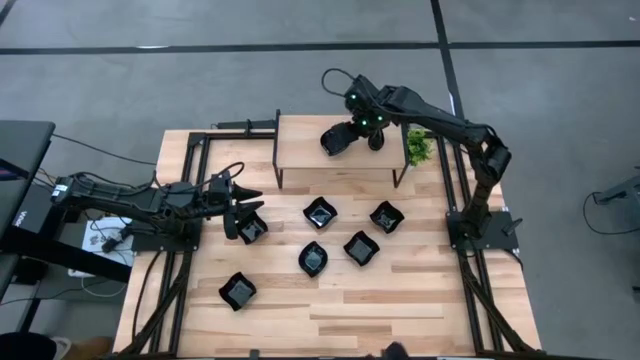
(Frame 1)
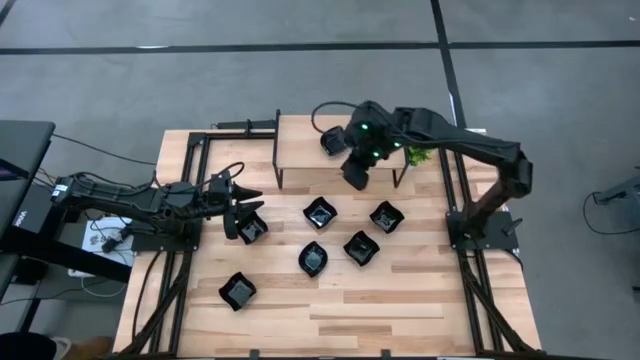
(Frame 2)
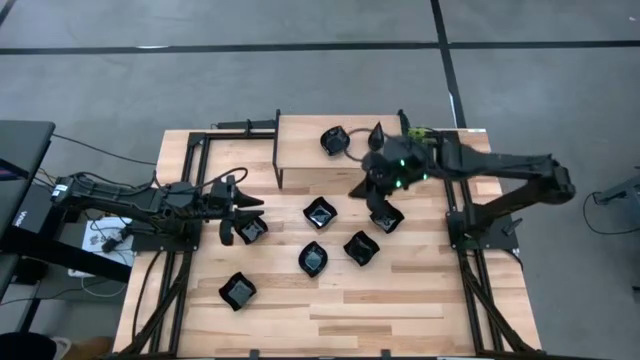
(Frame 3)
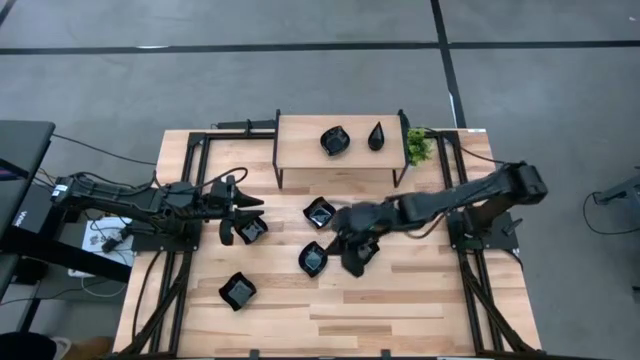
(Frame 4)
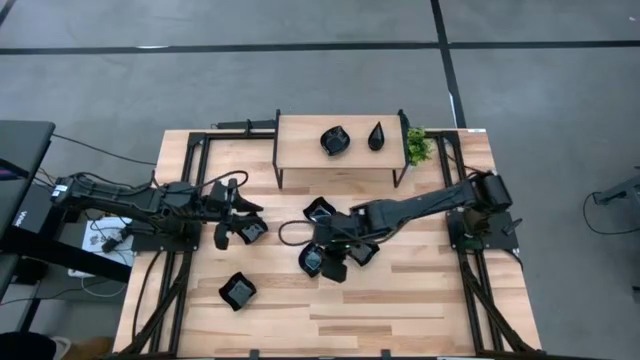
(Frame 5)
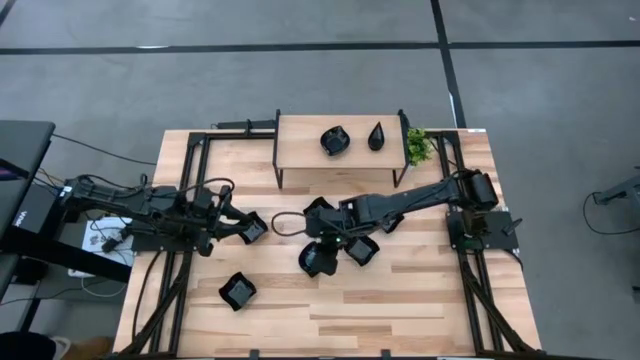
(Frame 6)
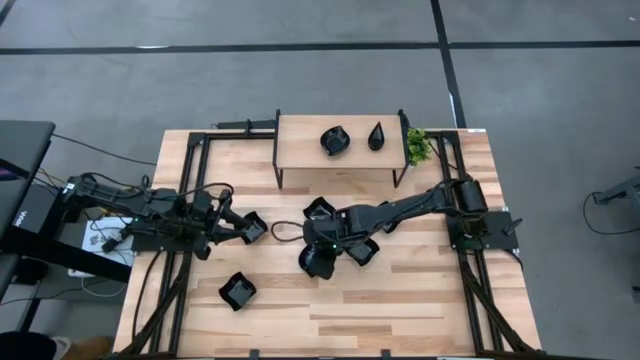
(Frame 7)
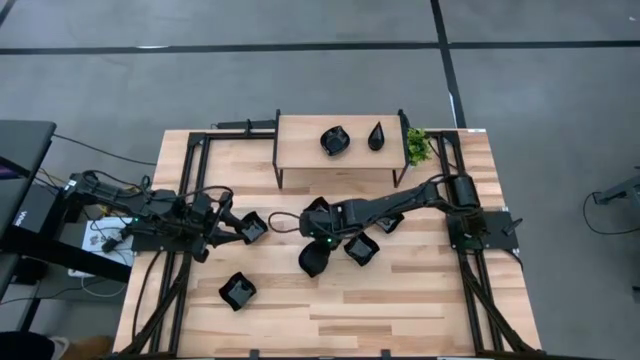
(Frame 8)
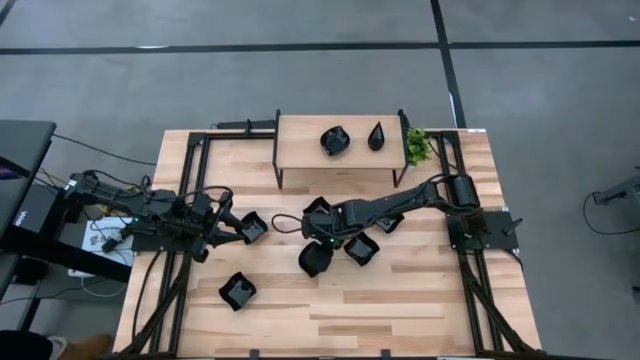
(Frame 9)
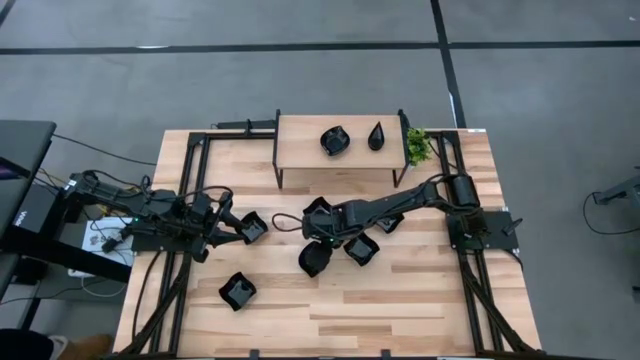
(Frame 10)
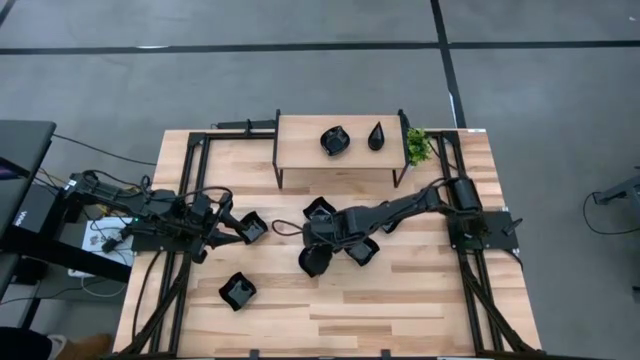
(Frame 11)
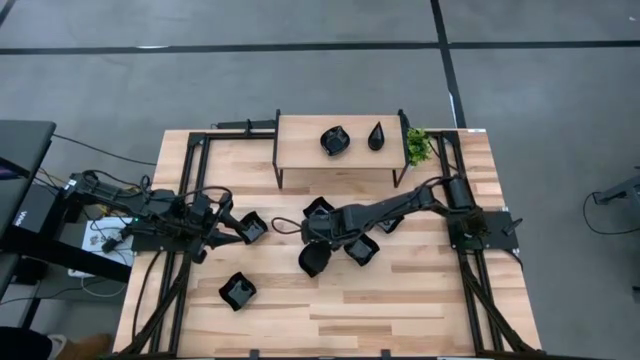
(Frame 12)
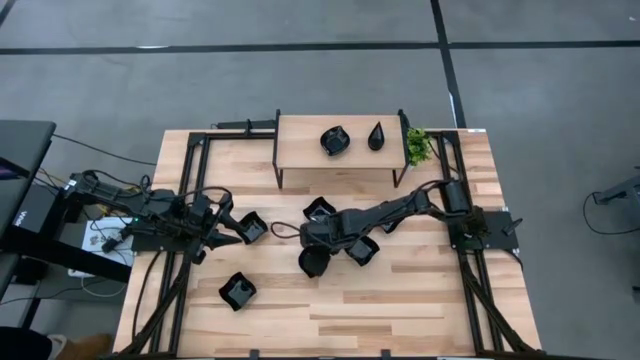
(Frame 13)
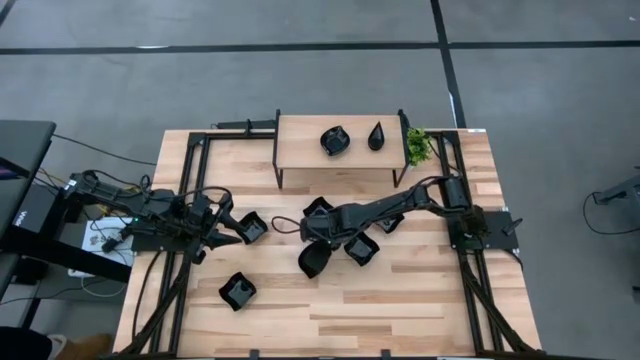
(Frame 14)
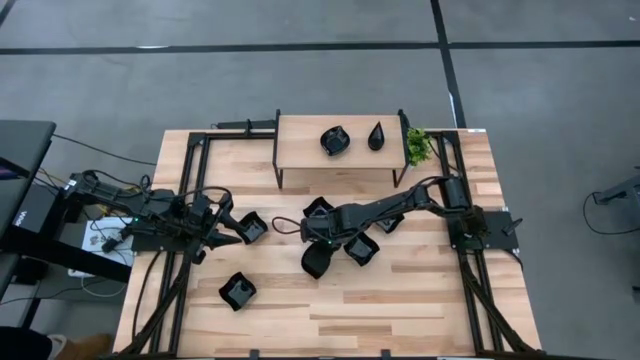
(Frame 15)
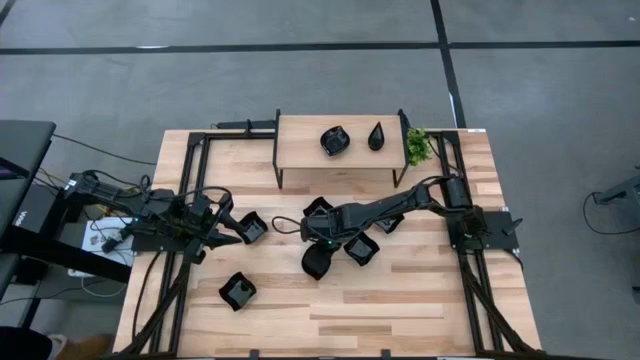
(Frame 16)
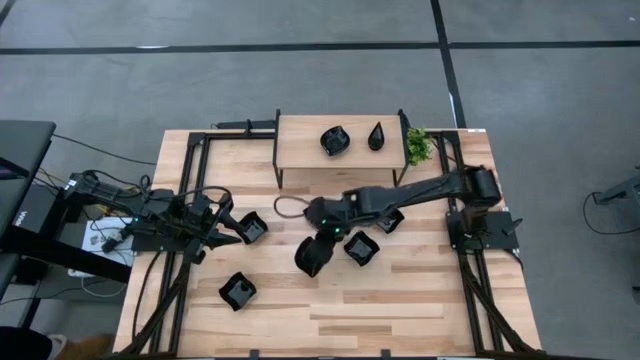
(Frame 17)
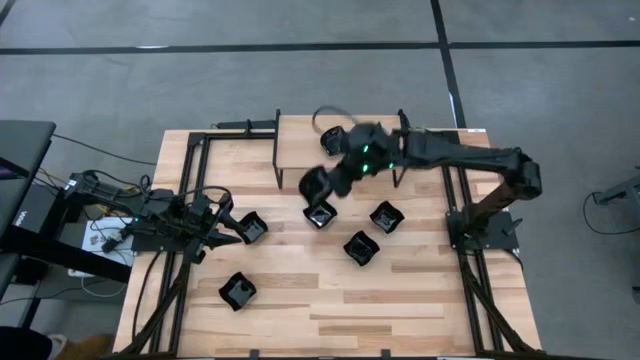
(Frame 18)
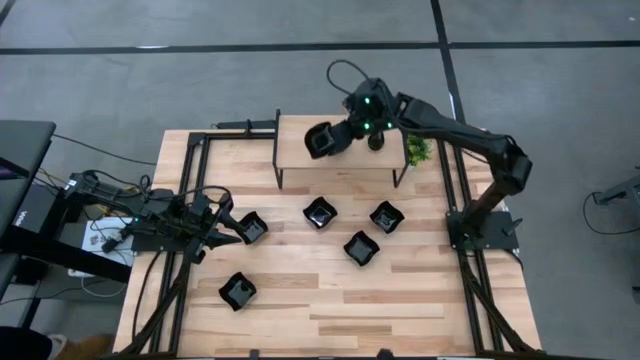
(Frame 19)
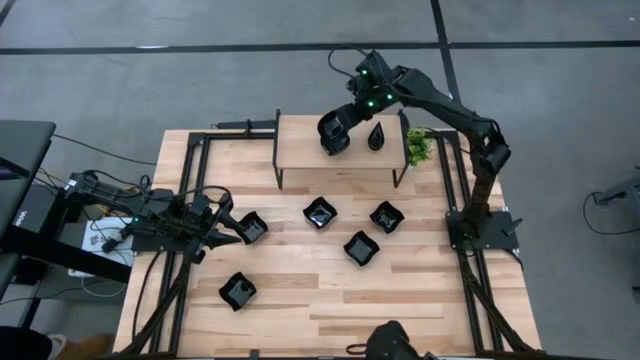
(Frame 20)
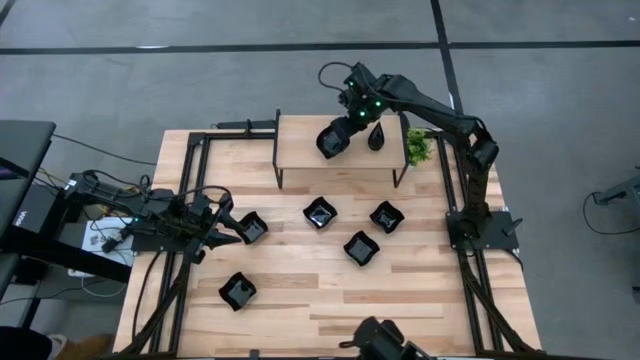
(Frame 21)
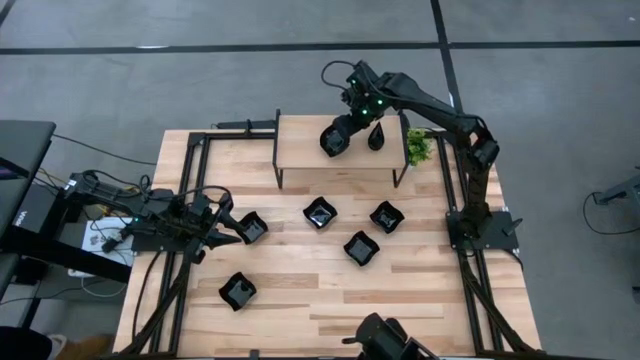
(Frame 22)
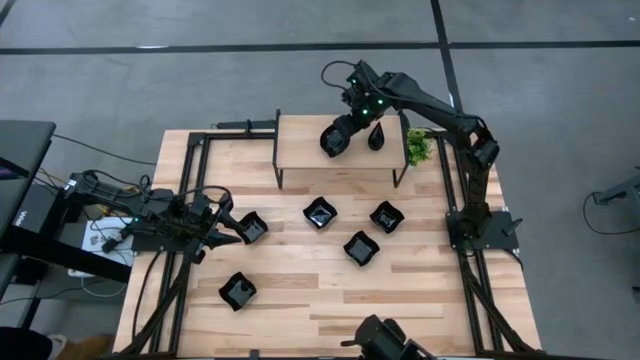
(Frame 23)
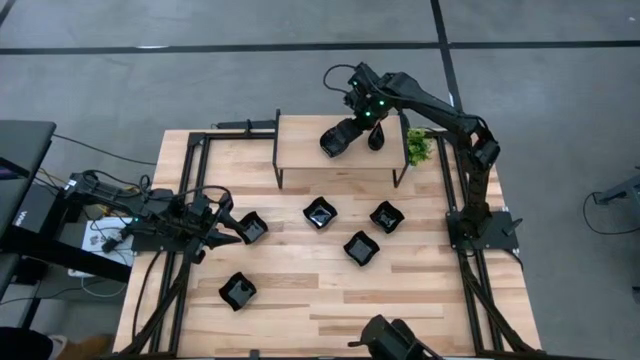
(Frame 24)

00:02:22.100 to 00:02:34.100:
Task: Pick & Place Mini shaped plates
Stack the leaf-shaped plate on top of the other leaf-shaped plates on the shelf

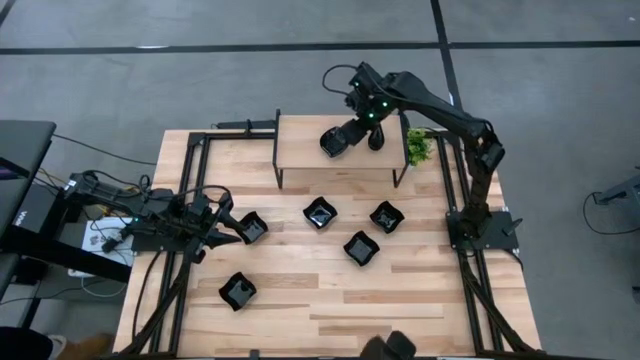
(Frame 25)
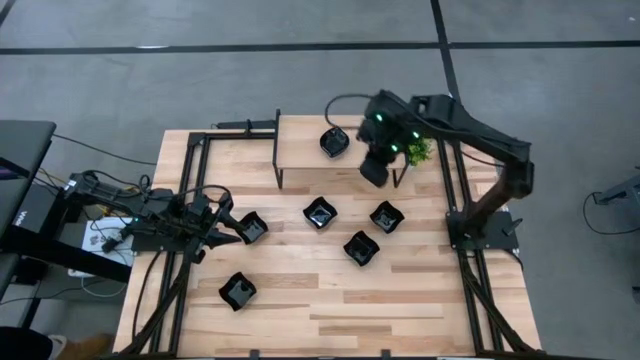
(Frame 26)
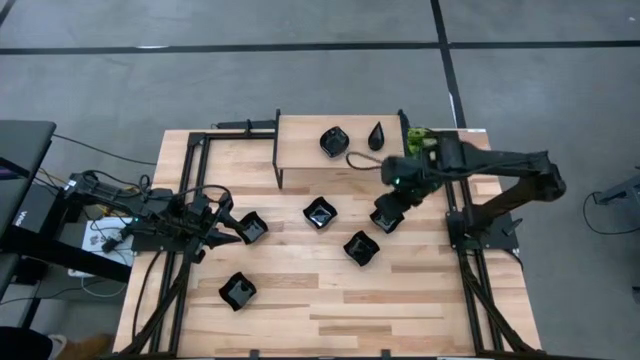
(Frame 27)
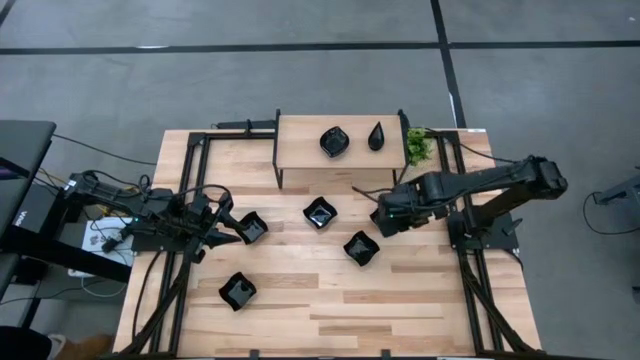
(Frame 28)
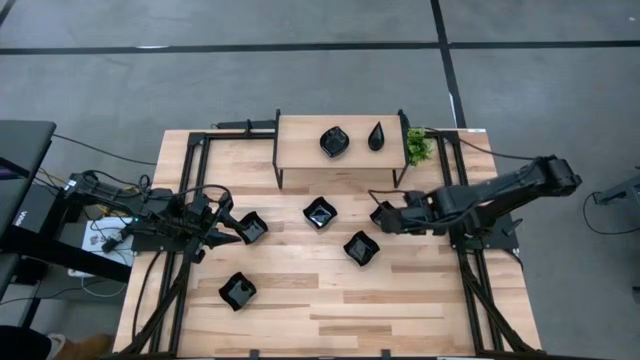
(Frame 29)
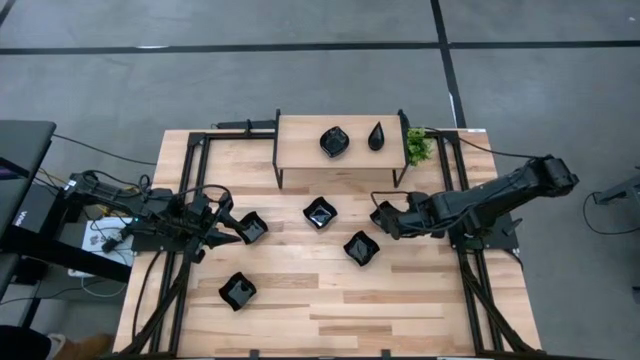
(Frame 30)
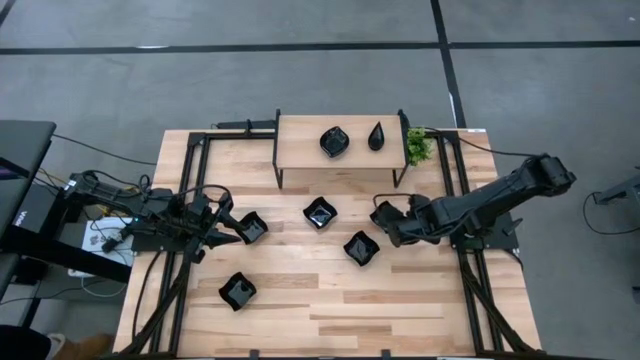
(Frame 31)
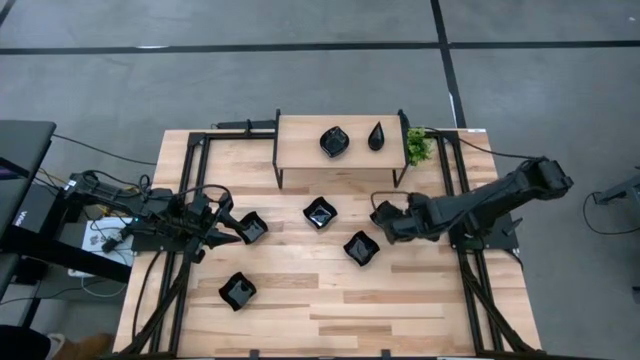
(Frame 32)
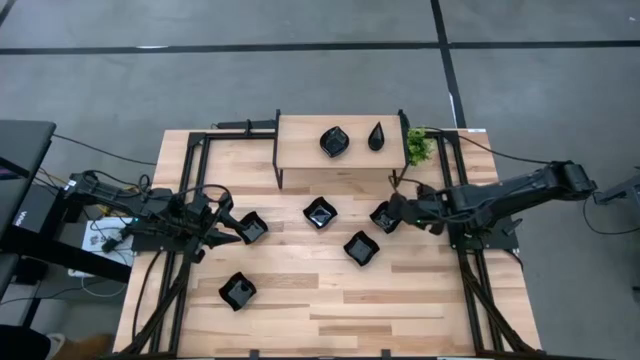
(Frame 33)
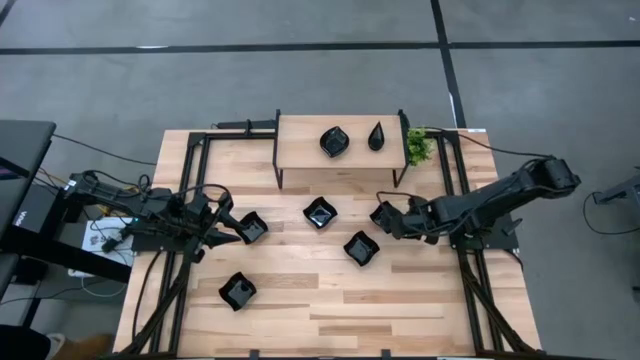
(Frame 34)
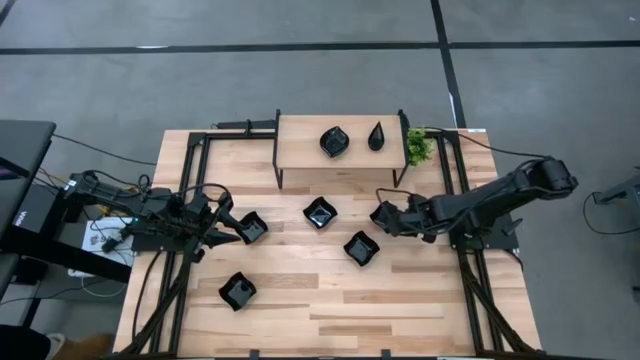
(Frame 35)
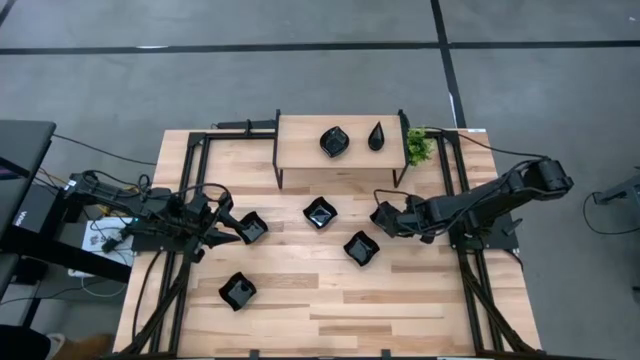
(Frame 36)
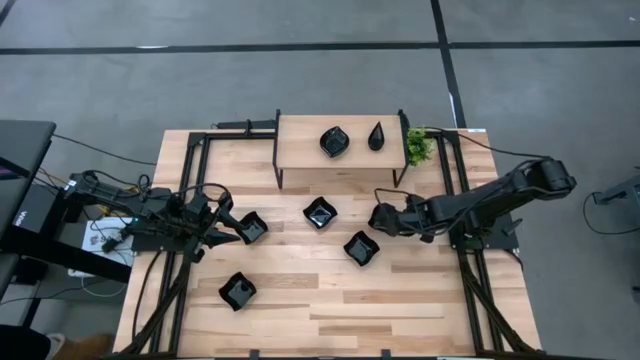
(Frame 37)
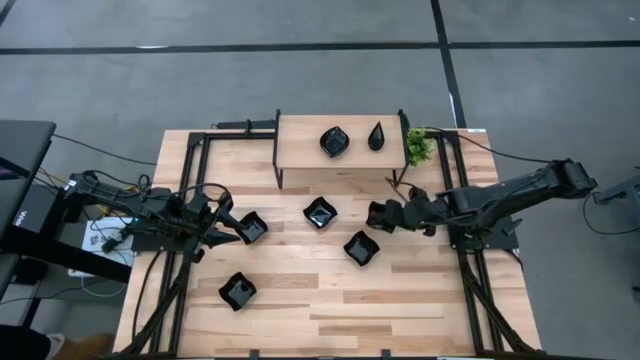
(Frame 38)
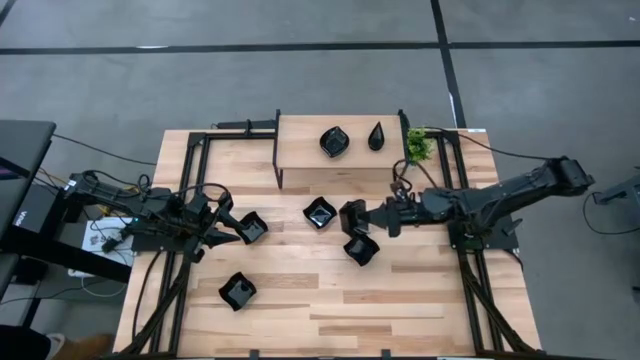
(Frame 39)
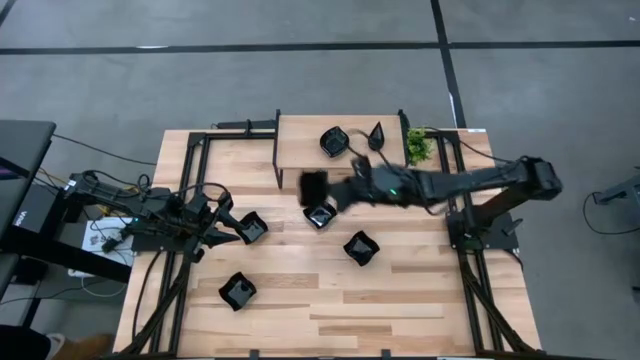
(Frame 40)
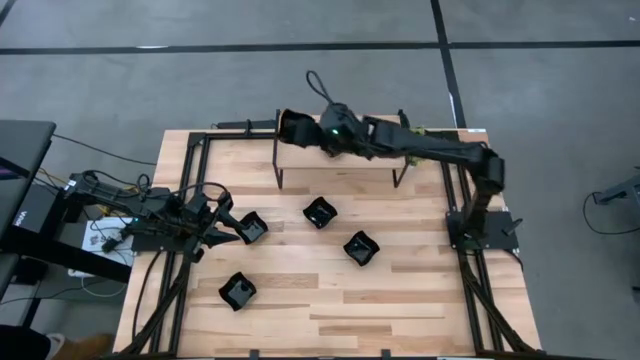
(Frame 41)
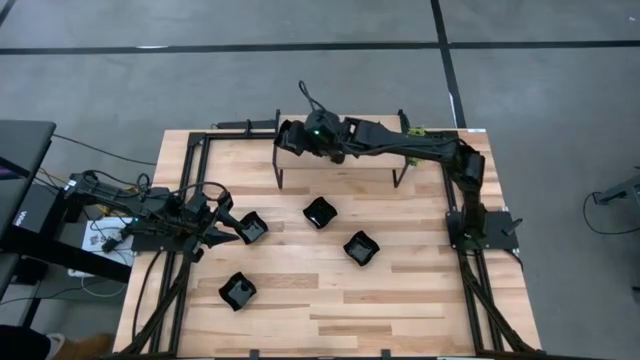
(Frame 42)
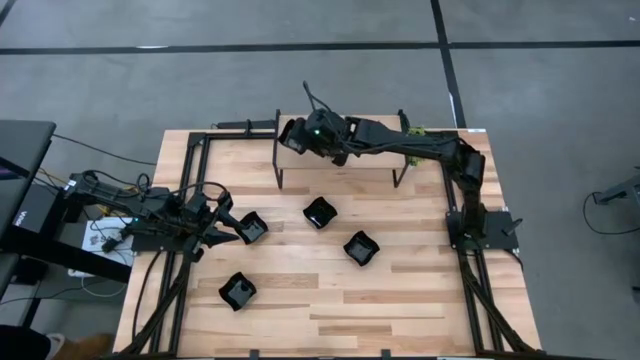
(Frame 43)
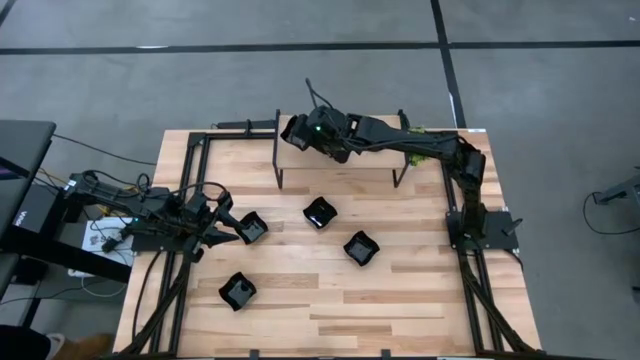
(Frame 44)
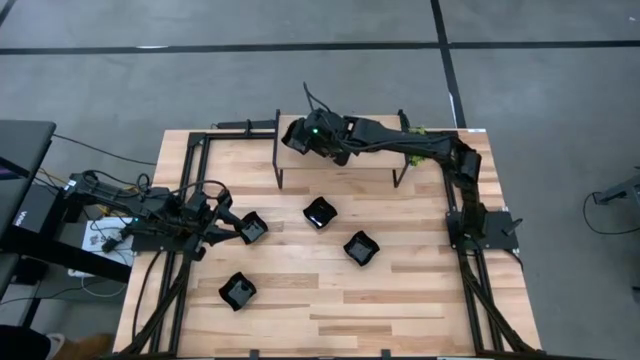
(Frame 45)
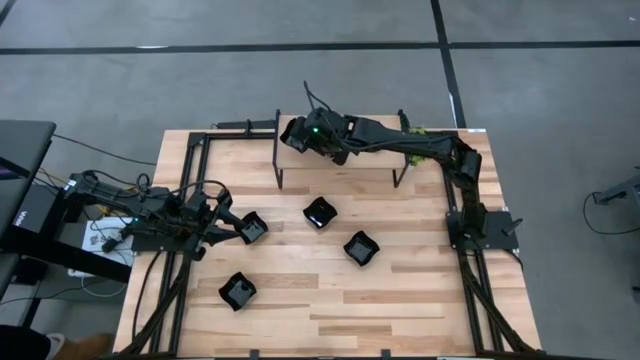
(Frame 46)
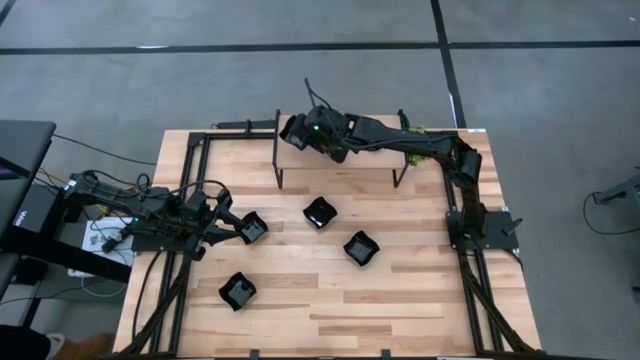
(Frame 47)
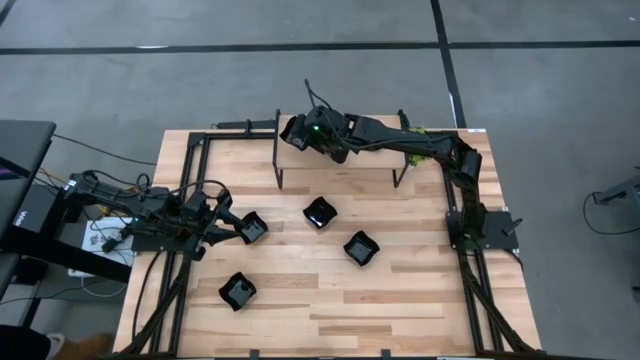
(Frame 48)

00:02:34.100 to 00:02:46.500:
Put the distorted square plate on the shelf
